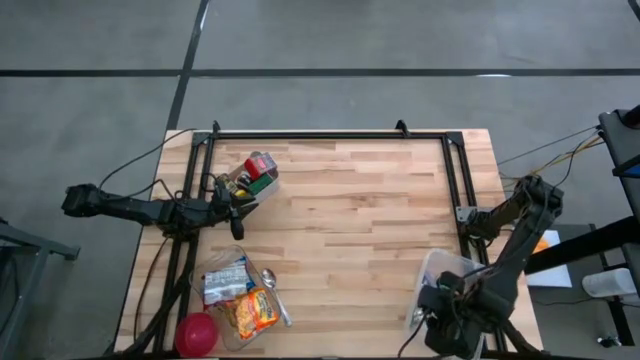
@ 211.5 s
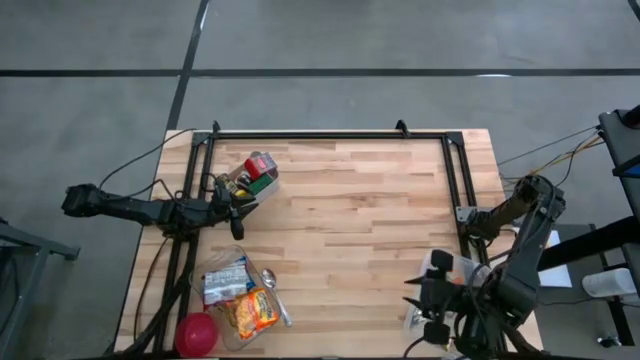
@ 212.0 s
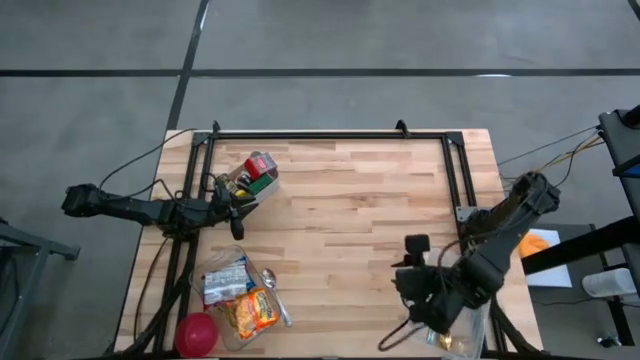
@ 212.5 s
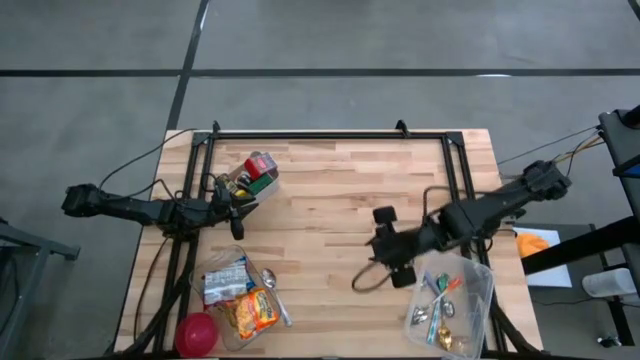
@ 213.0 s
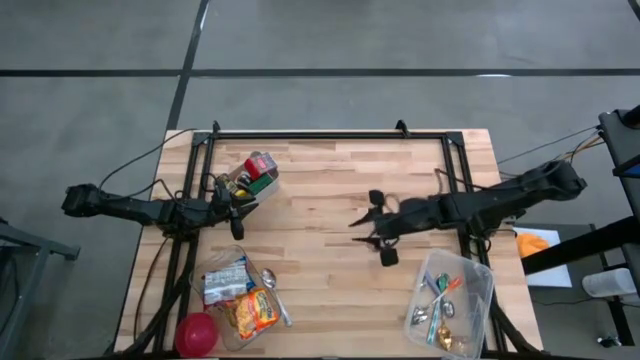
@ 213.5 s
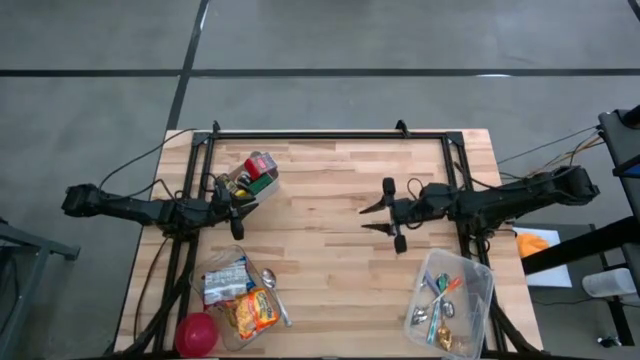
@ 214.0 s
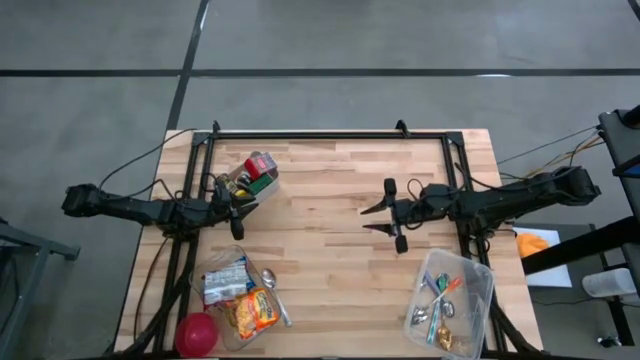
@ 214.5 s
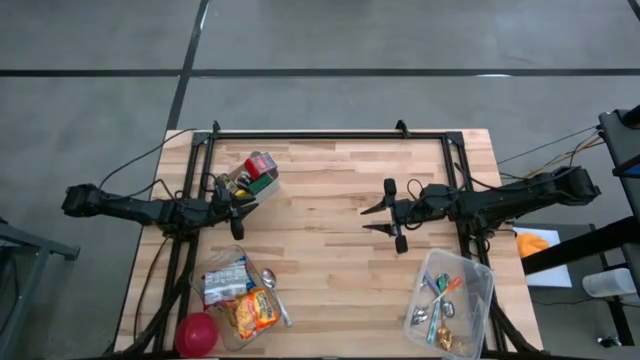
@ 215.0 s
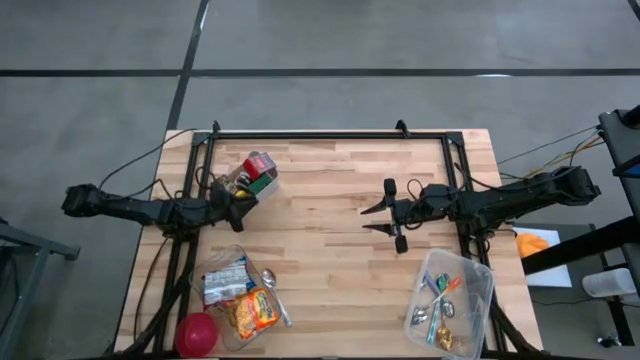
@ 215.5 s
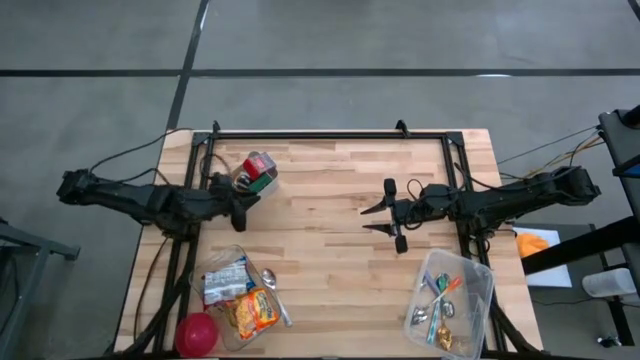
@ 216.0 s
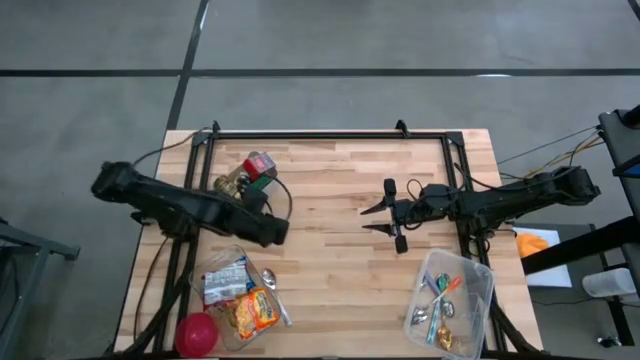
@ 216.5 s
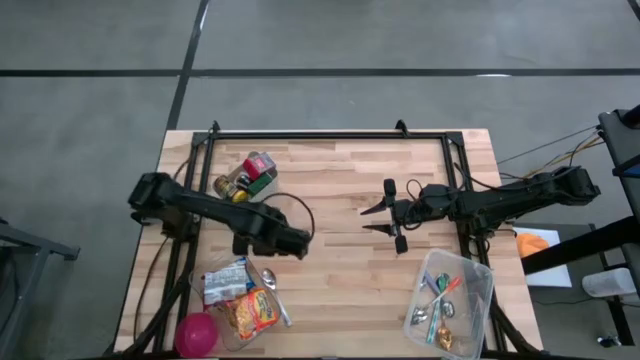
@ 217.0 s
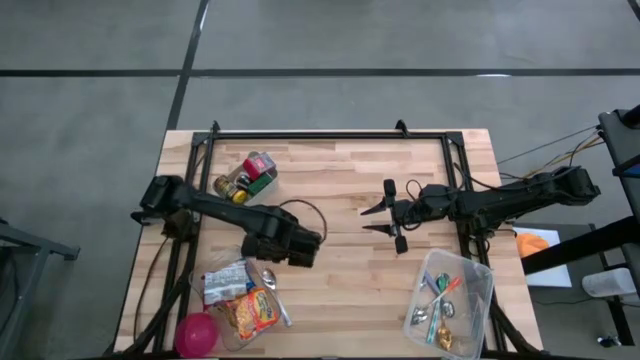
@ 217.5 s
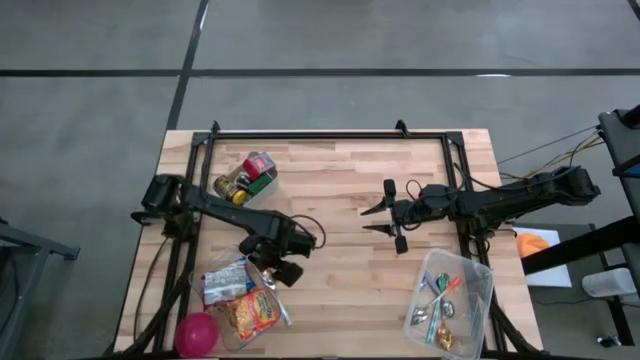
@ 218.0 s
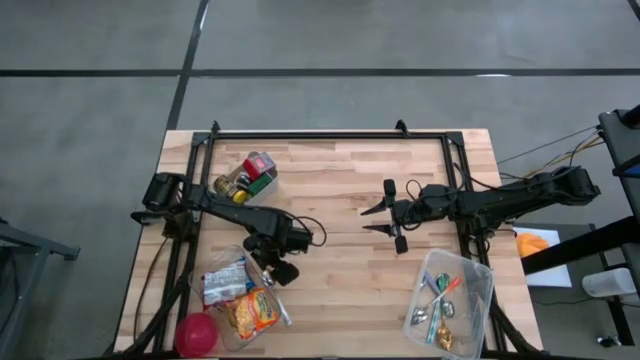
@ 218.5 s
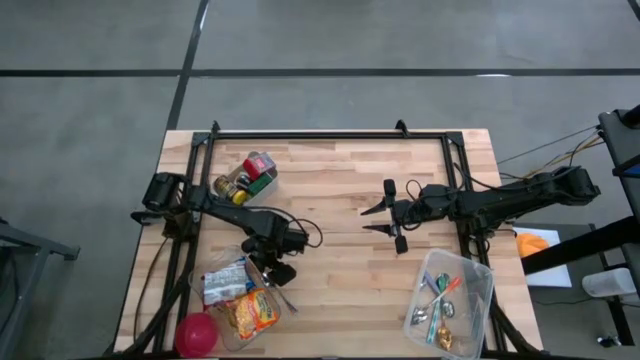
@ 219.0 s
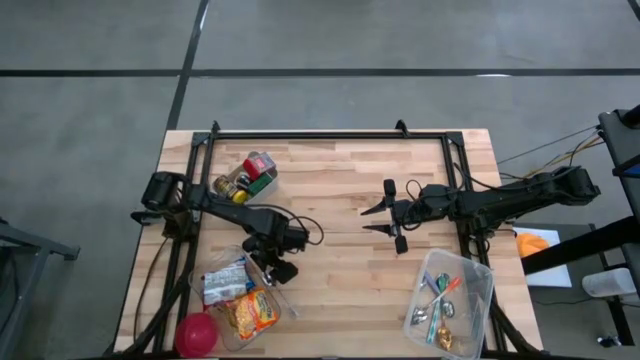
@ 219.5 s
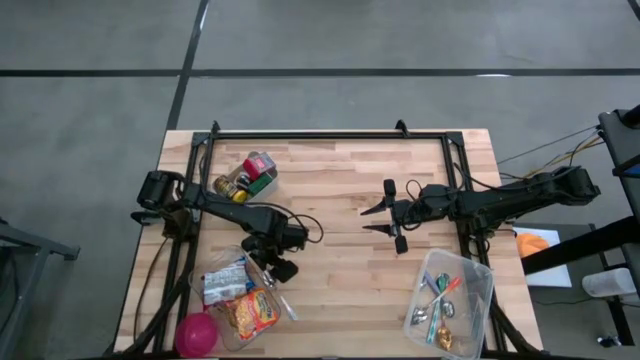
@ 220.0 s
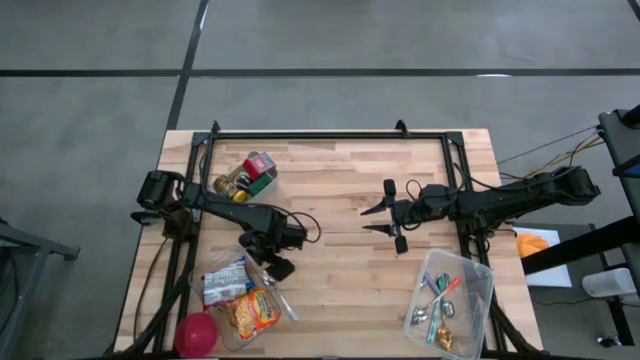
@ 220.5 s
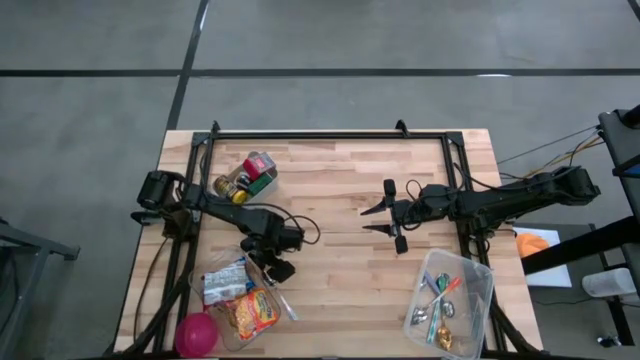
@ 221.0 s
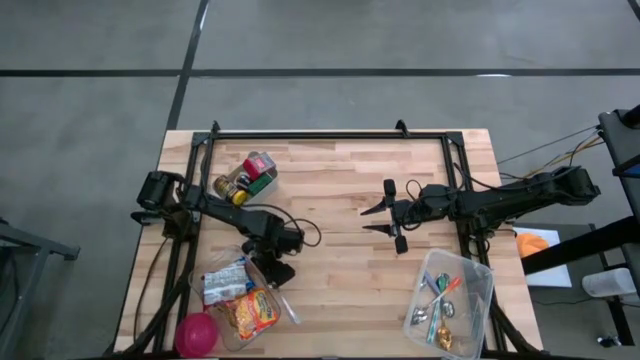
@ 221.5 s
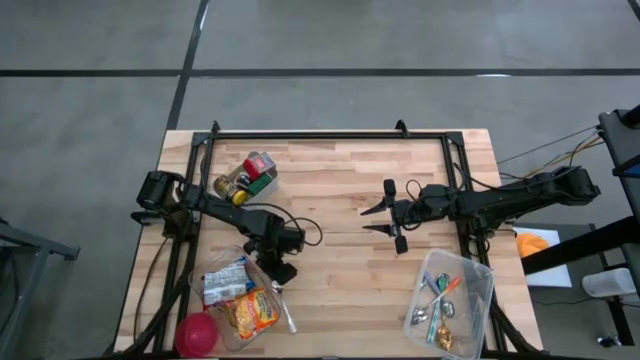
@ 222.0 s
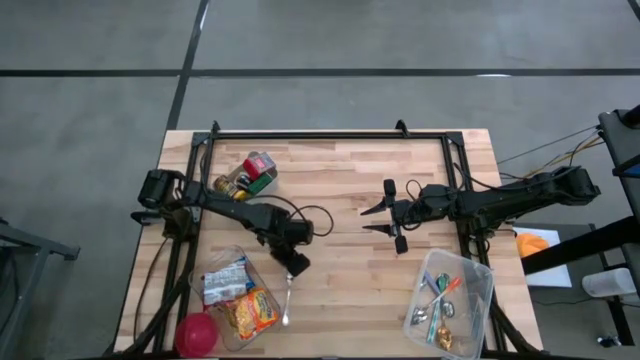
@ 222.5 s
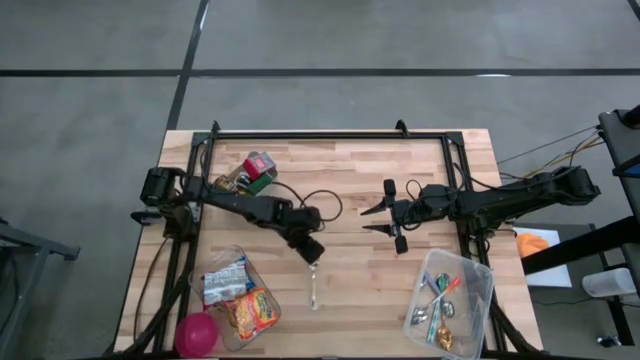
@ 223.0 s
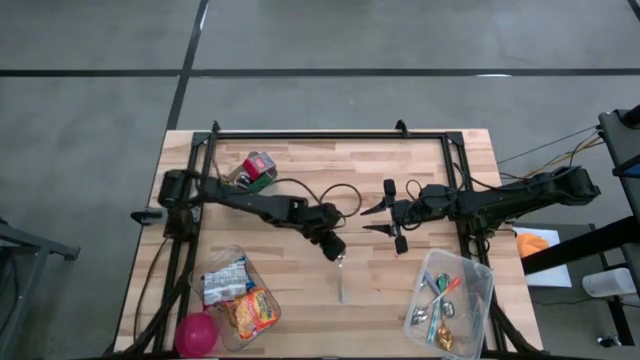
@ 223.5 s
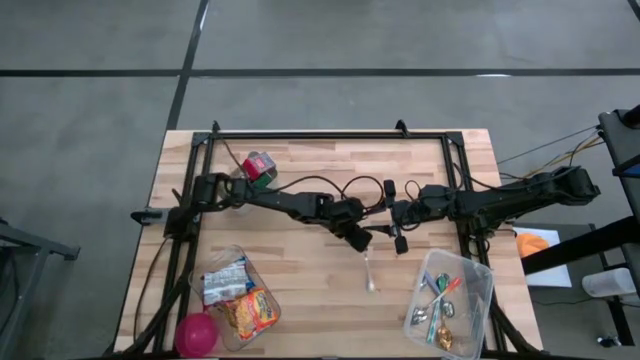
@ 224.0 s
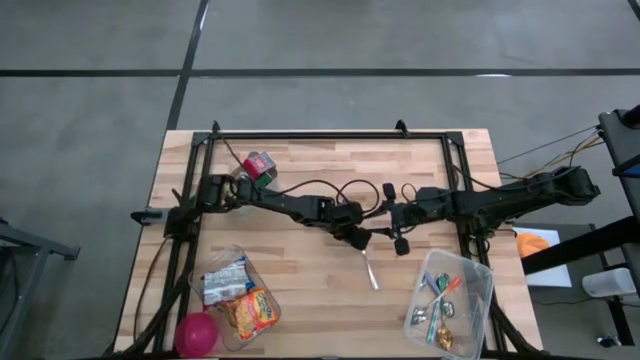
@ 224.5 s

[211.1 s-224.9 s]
Put the silver spoon into the white bin
